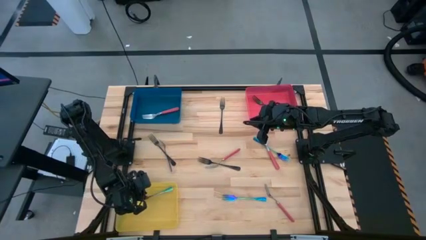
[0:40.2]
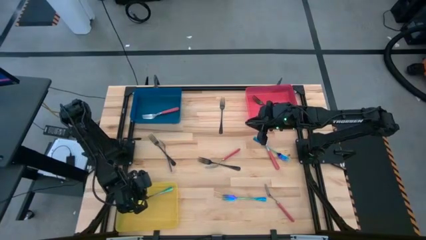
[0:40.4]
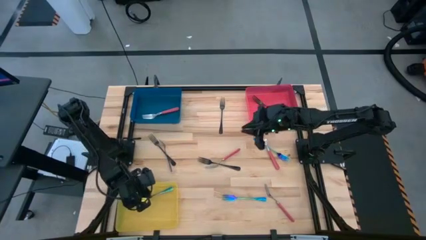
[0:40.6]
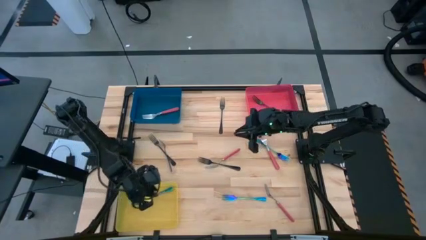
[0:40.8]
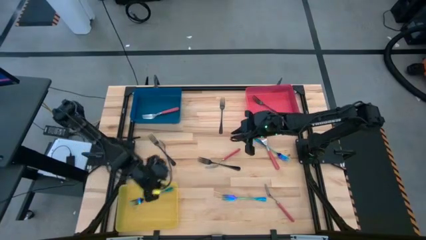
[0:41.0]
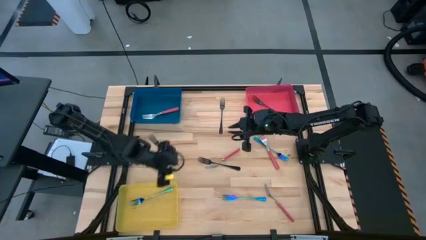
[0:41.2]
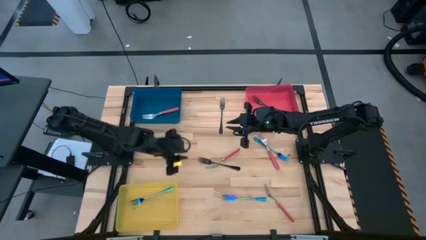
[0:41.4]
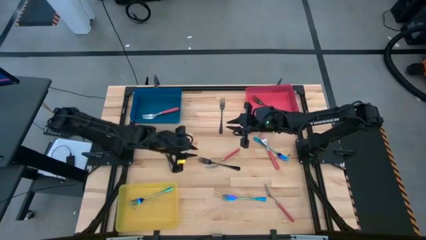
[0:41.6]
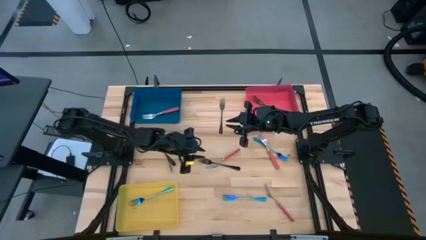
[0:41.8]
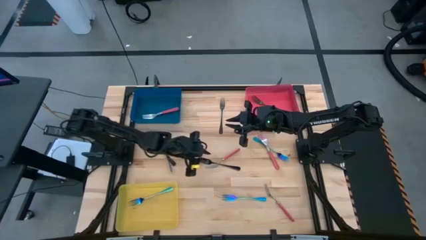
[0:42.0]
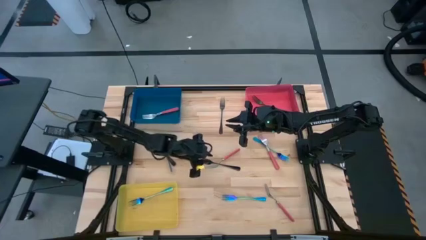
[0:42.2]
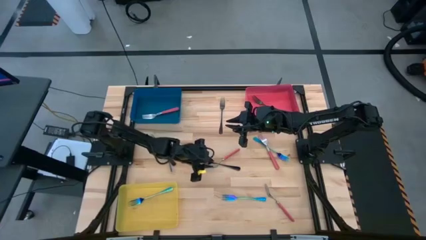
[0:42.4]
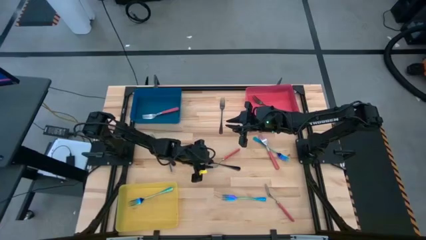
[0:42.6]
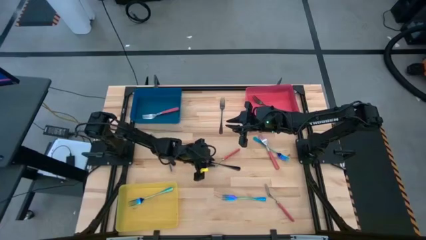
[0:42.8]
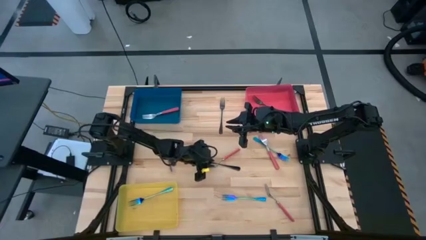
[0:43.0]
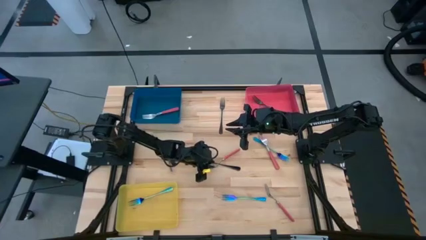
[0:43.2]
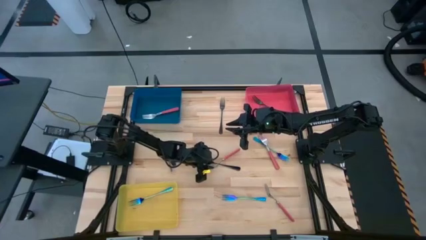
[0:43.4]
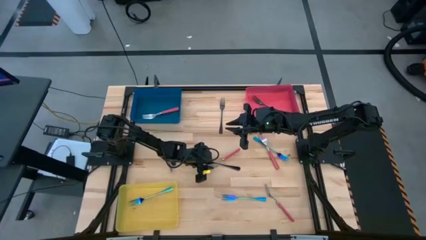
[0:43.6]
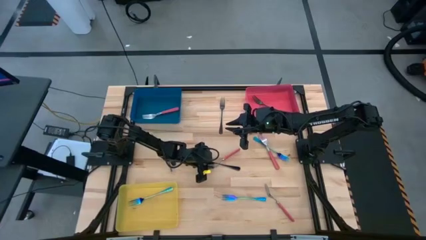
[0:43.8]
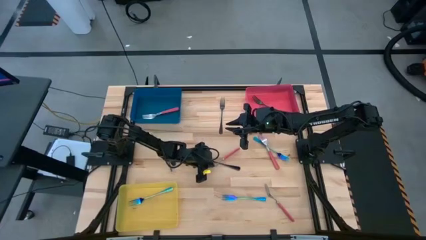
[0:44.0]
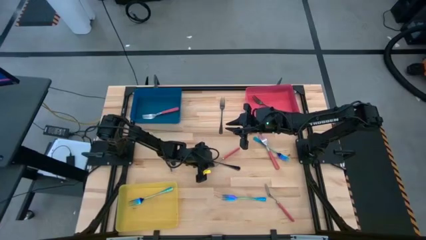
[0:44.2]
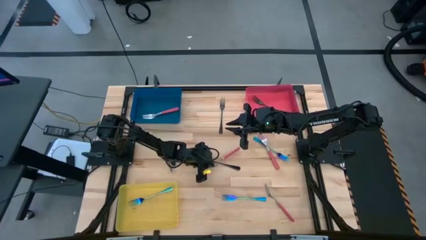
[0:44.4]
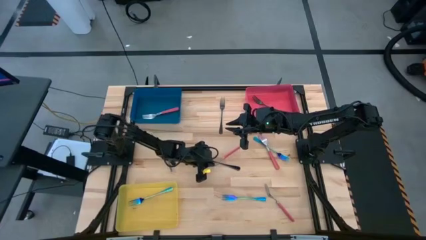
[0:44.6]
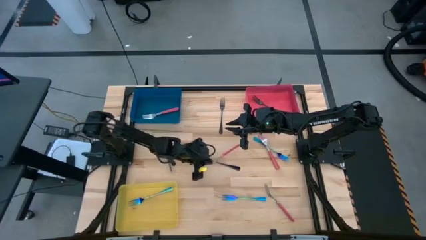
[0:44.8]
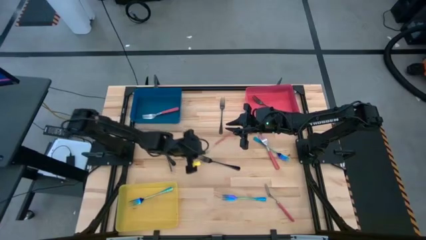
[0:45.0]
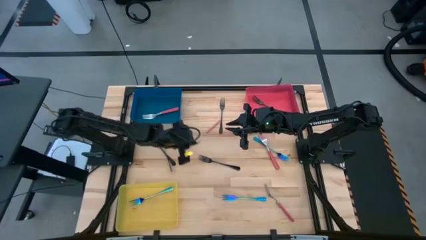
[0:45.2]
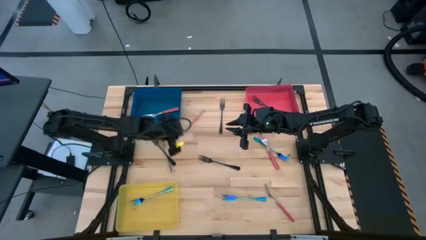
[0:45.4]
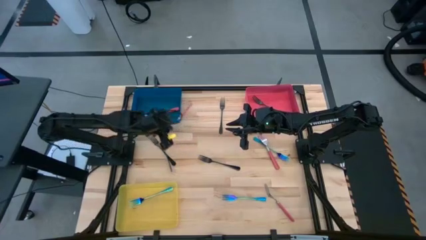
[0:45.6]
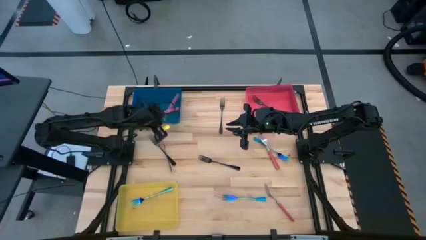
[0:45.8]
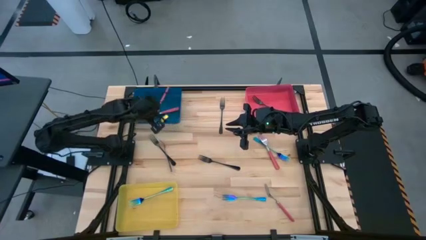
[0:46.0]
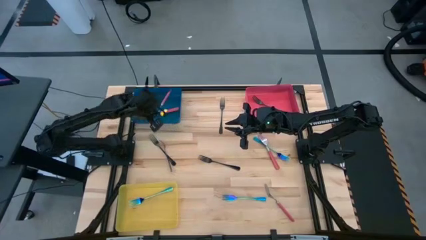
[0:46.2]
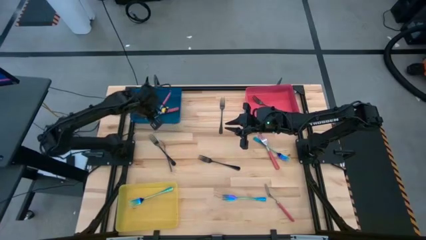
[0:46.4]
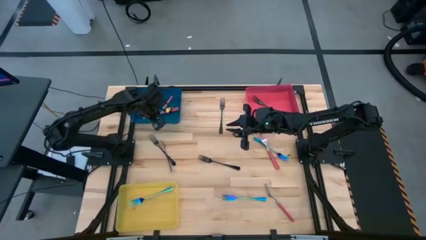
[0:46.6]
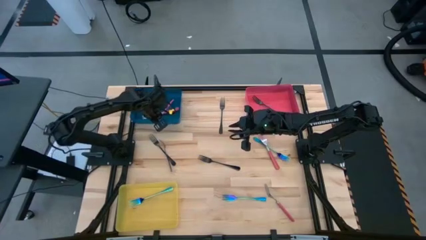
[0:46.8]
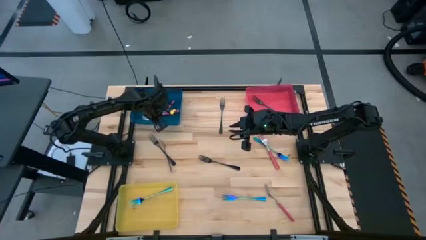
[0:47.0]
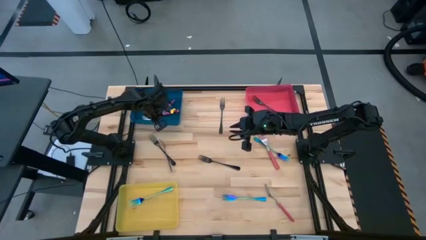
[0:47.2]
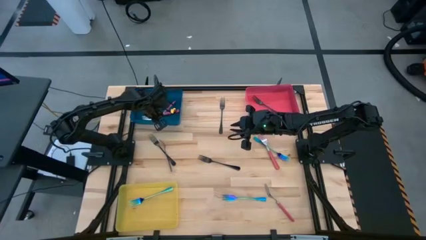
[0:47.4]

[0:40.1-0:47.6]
Task: Sort silverware by color (type)
Put the red fork into the blue bin

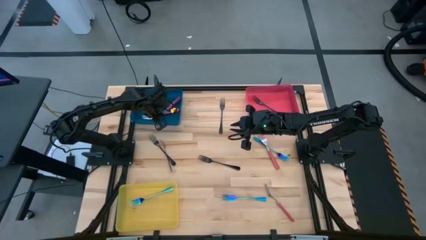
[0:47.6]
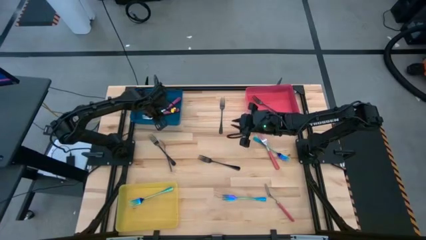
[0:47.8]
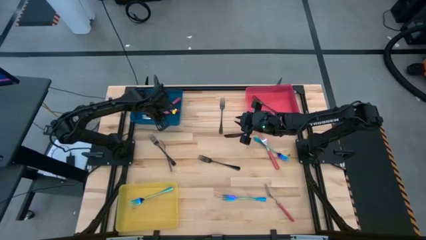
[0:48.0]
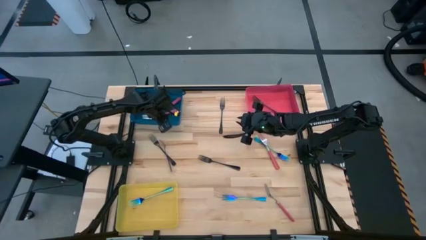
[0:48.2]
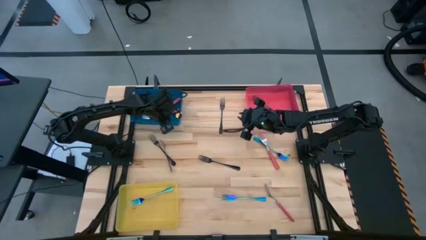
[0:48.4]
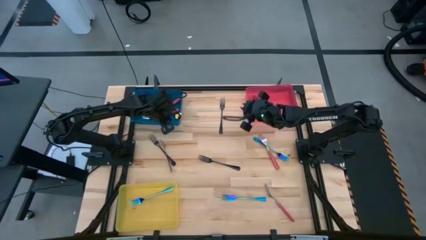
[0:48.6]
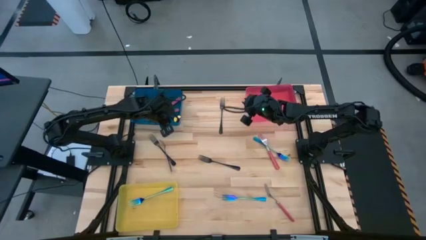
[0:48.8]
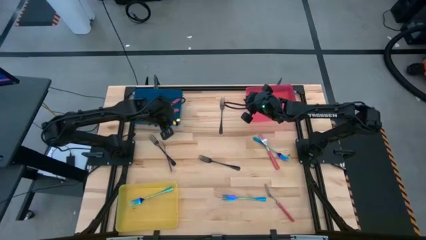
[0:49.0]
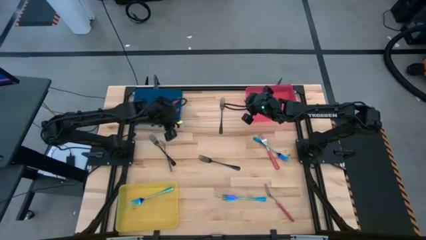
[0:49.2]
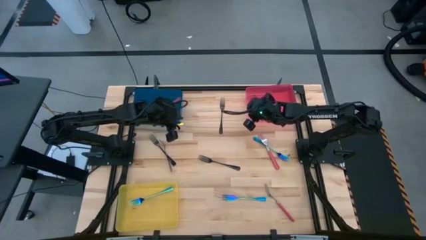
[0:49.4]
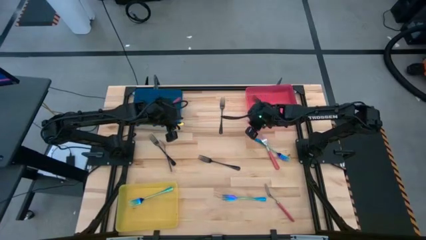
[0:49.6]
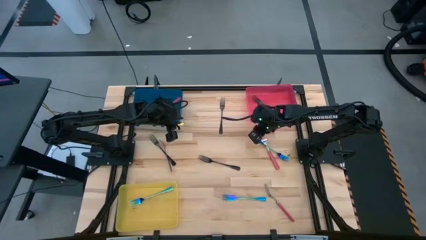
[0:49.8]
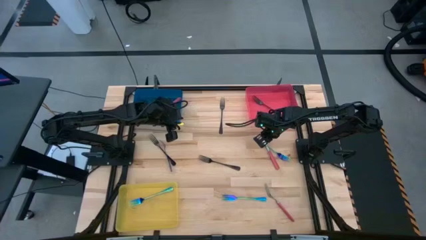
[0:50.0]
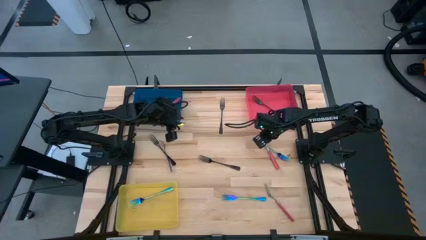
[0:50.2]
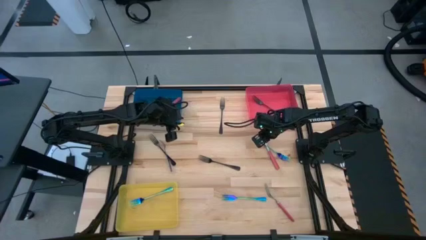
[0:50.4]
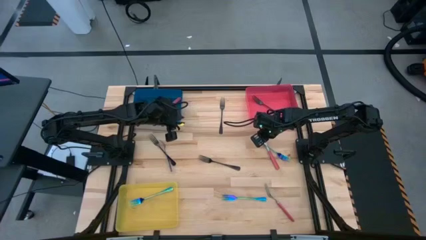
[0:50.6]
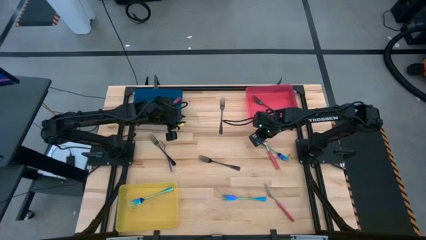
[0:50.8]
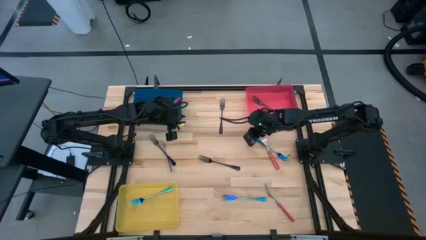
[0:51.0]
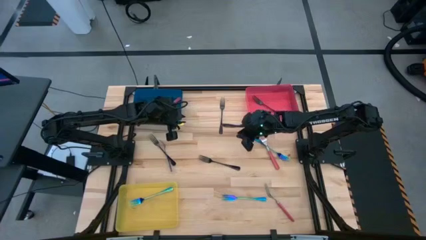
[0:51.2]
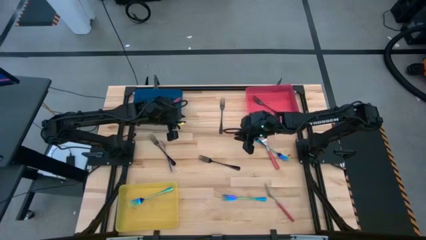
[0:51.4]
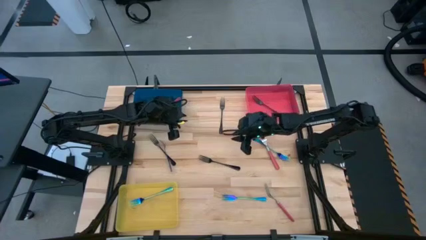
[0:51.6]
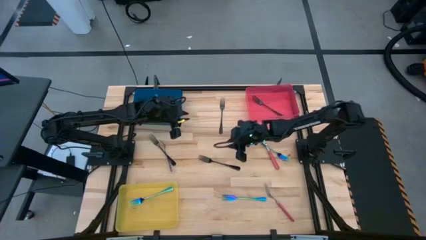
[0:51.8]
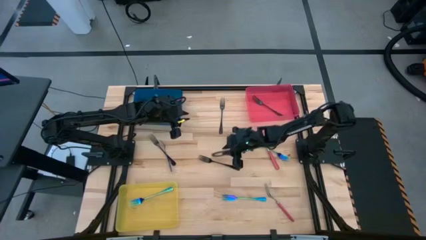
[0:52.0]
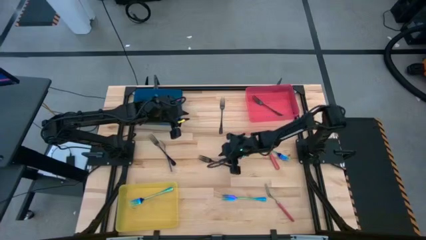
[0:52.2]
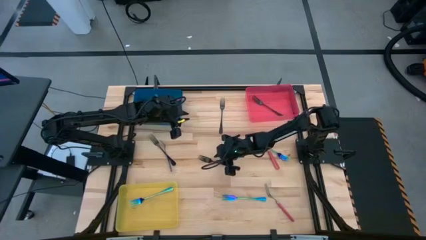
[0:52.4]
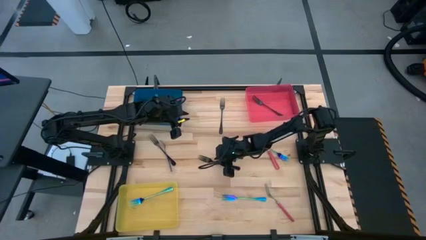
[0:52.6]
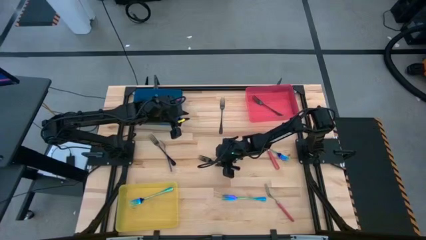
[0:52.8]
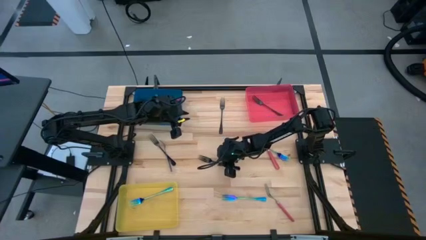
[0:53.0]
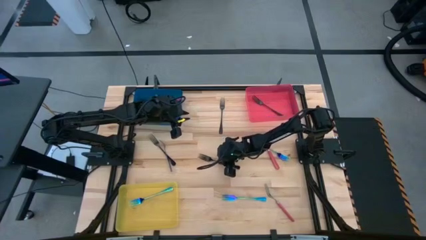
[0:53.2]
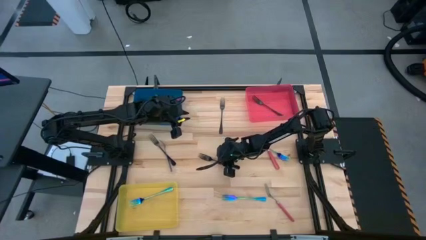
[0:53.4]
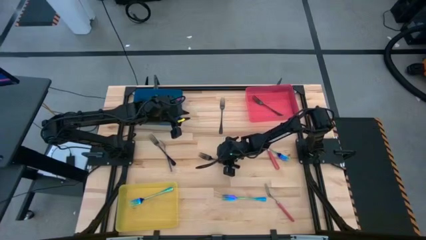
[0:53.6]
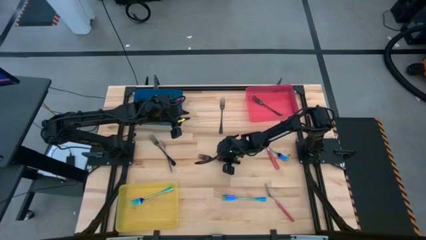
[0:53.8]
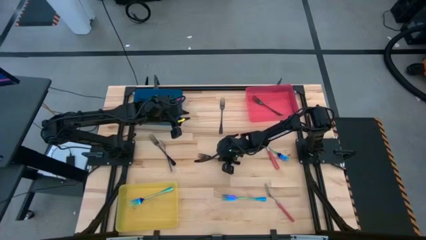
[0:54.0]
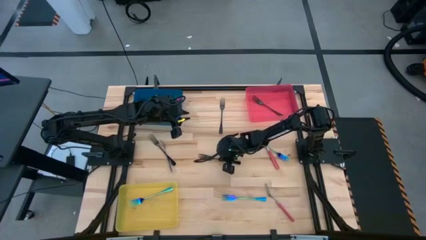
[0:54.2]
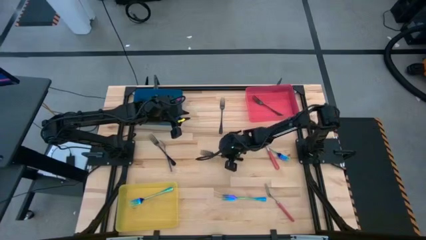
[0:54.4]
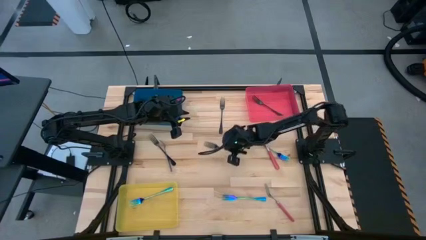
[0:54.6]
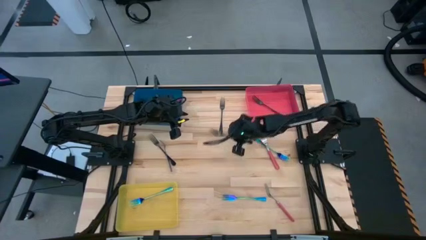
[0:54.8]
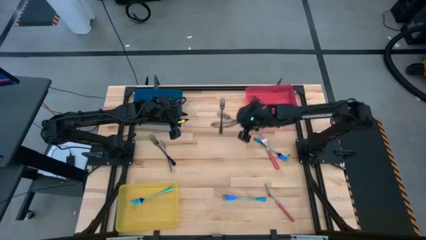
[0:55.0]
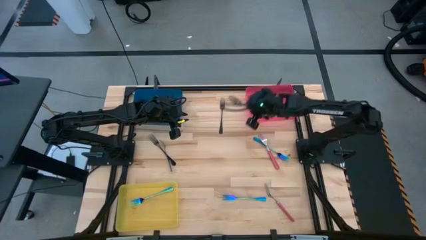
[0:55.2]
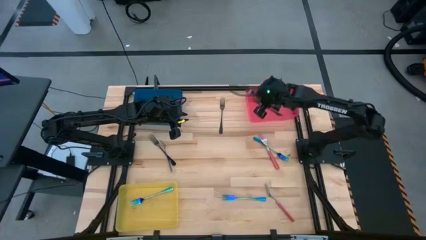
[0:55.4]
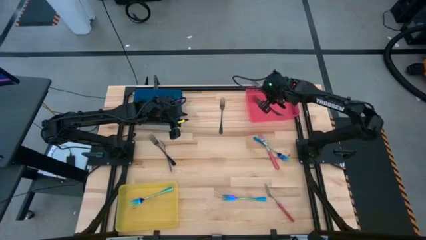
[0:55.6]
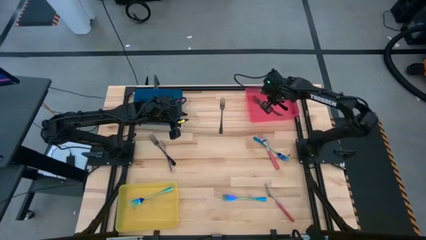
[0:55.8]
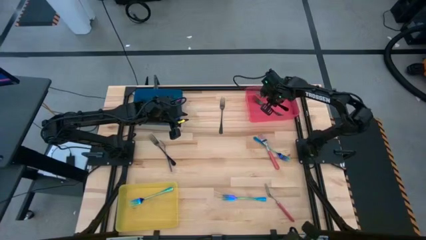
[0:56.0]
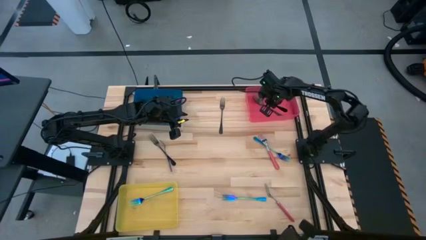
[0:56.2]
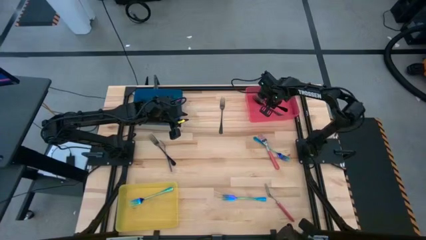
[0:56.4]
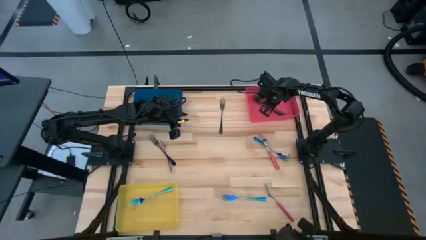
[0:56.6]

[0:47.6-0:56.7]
Put the black fork into the red bin
